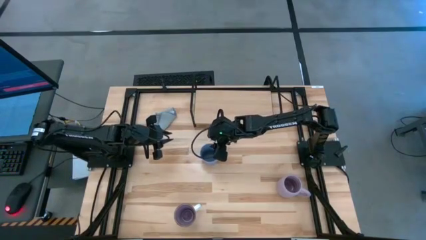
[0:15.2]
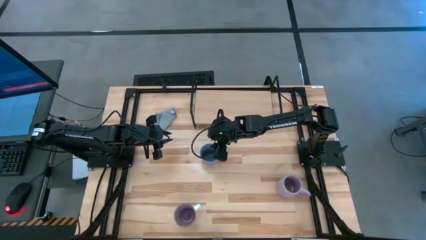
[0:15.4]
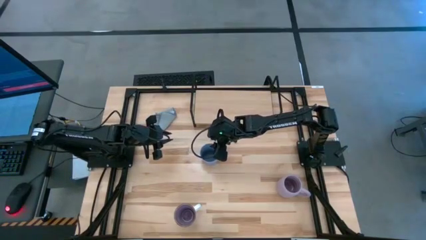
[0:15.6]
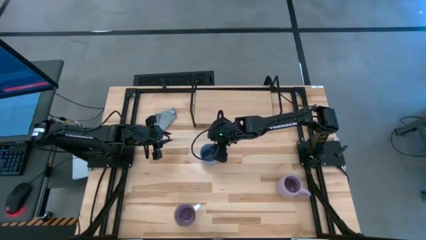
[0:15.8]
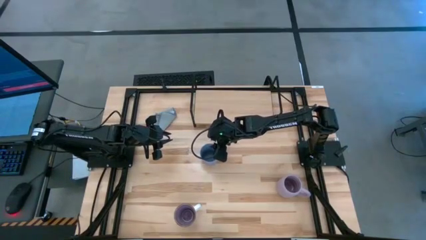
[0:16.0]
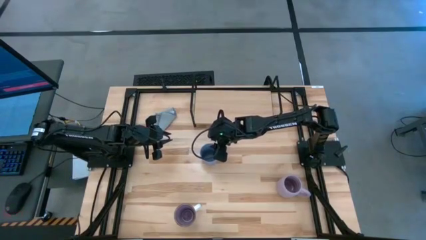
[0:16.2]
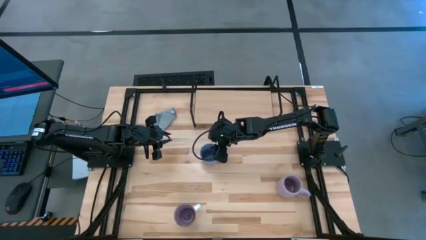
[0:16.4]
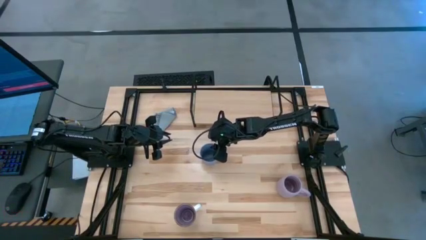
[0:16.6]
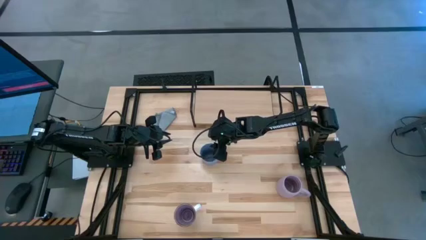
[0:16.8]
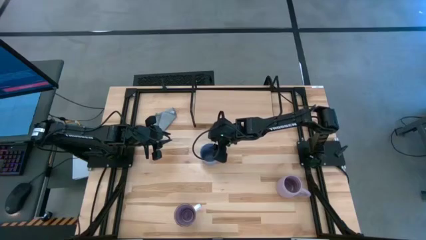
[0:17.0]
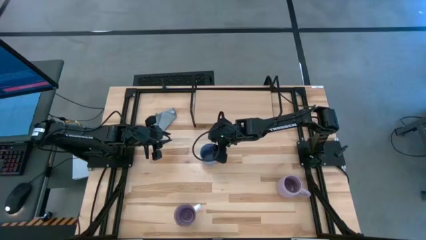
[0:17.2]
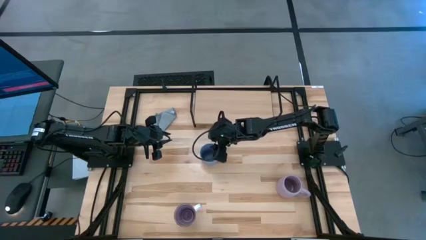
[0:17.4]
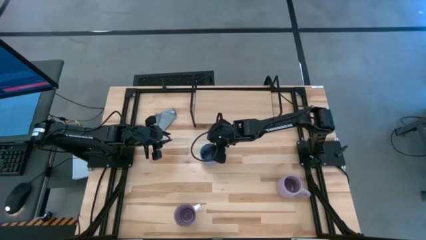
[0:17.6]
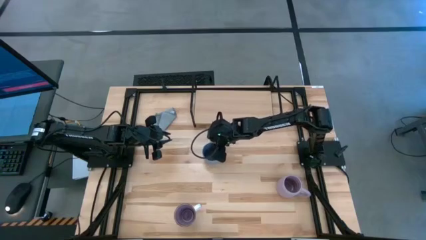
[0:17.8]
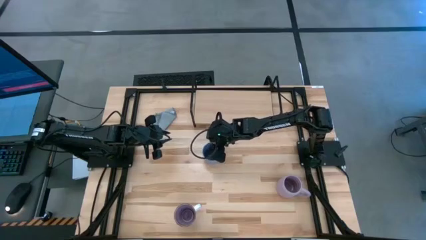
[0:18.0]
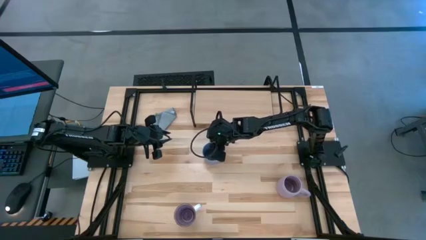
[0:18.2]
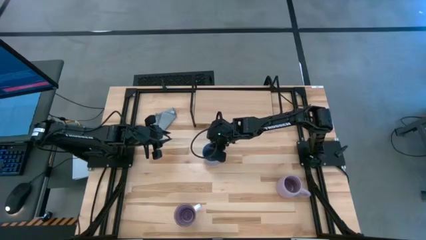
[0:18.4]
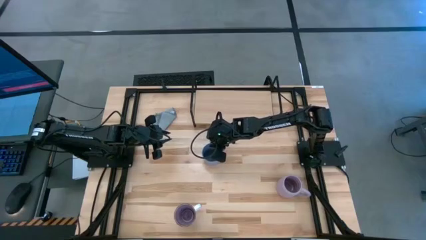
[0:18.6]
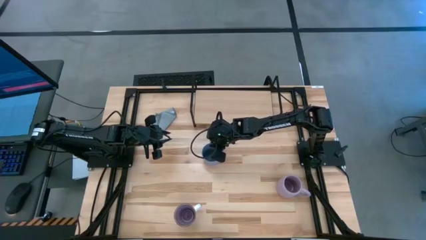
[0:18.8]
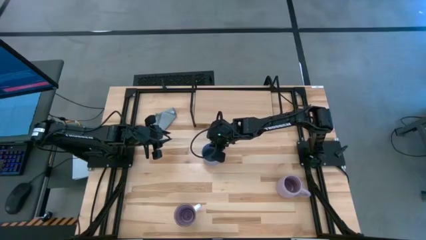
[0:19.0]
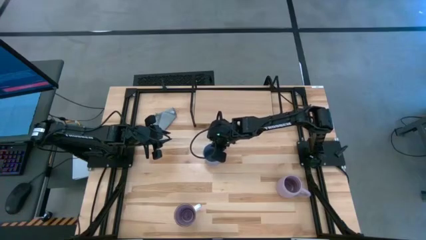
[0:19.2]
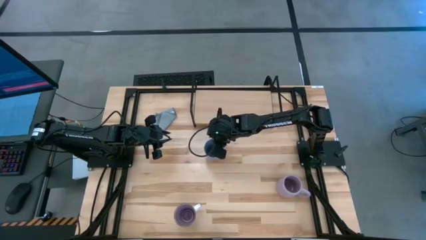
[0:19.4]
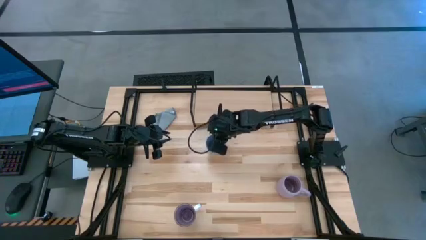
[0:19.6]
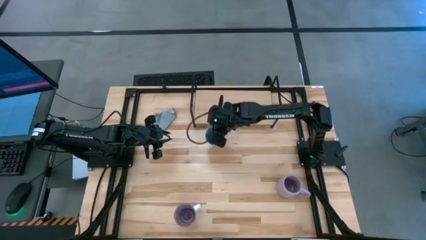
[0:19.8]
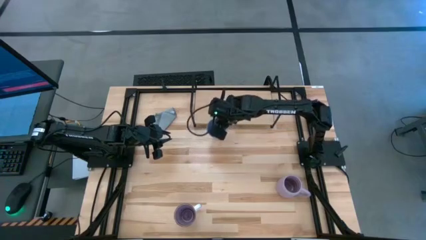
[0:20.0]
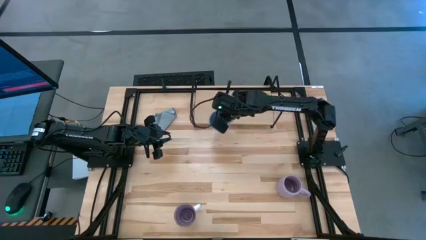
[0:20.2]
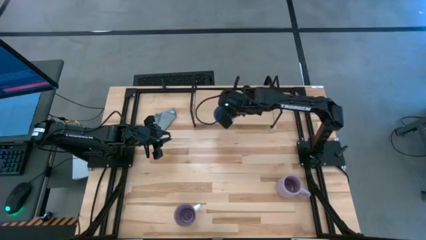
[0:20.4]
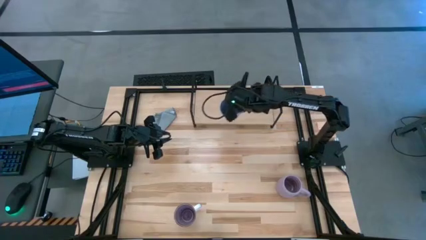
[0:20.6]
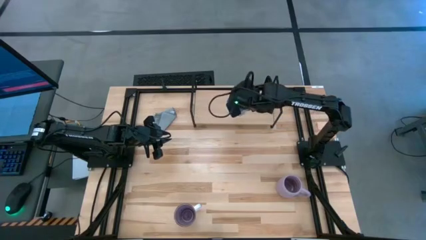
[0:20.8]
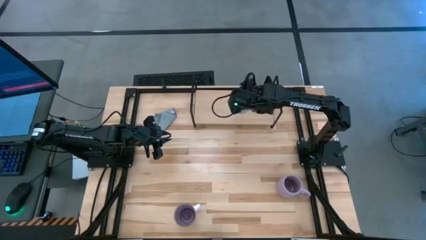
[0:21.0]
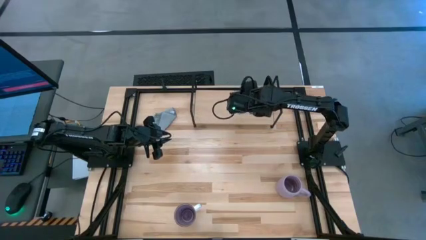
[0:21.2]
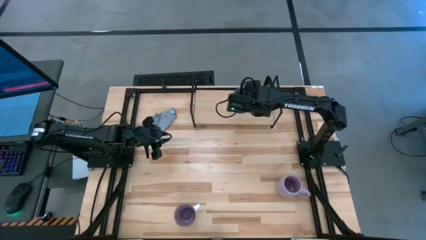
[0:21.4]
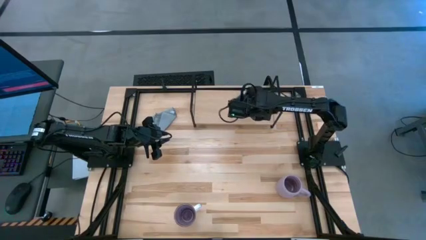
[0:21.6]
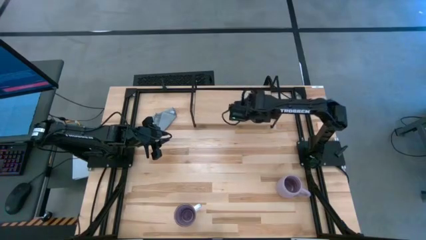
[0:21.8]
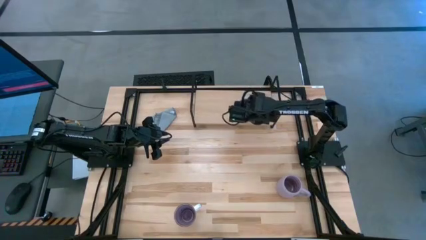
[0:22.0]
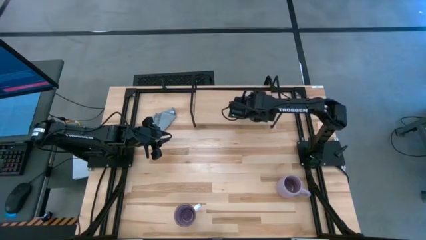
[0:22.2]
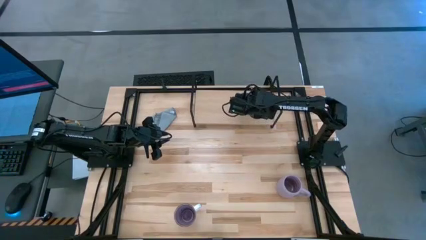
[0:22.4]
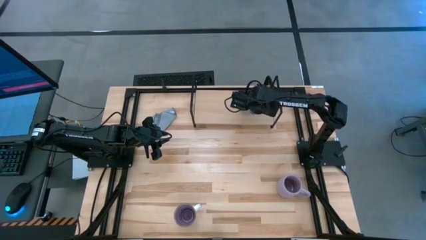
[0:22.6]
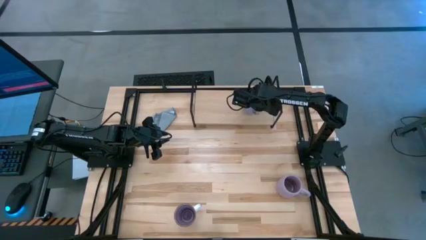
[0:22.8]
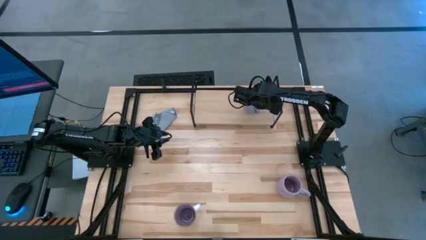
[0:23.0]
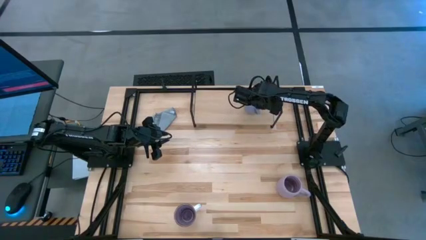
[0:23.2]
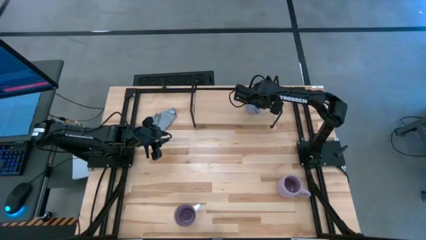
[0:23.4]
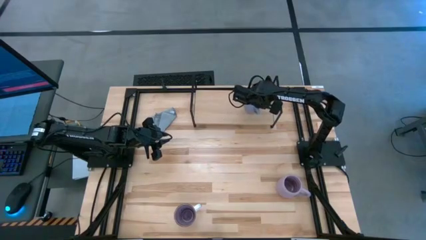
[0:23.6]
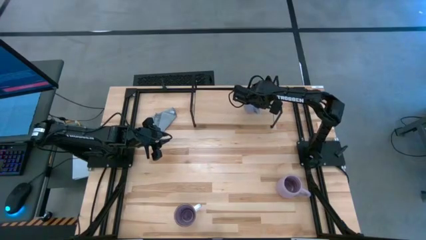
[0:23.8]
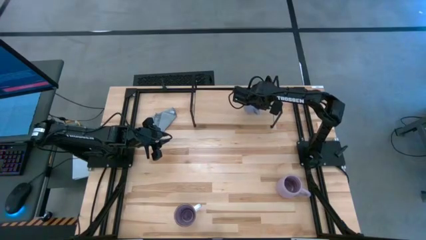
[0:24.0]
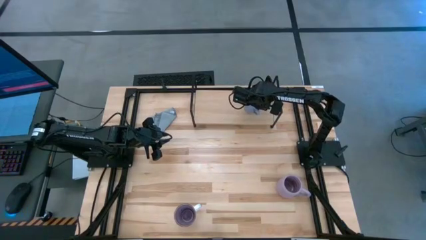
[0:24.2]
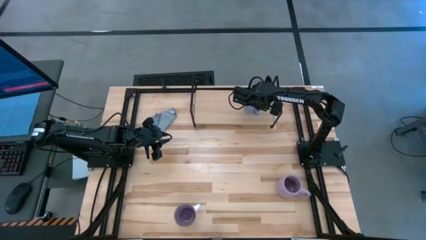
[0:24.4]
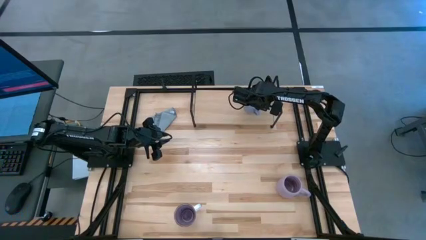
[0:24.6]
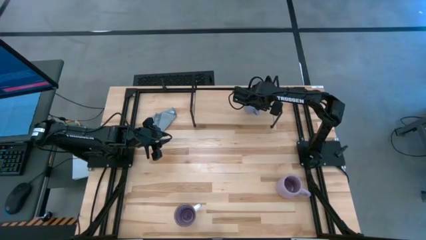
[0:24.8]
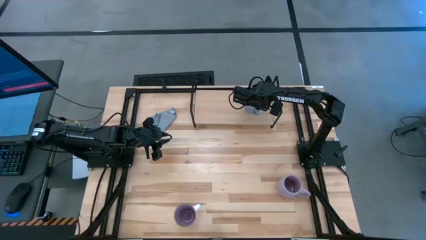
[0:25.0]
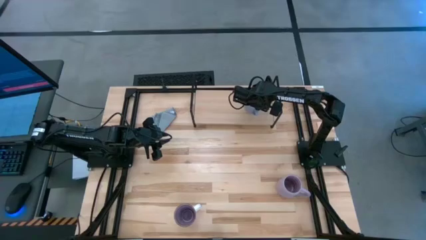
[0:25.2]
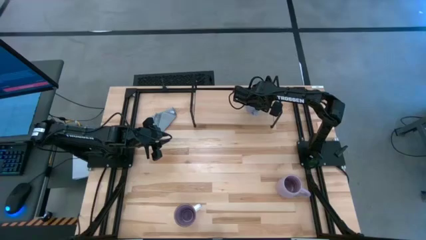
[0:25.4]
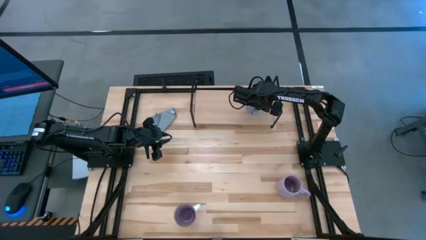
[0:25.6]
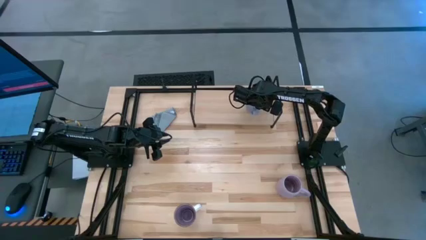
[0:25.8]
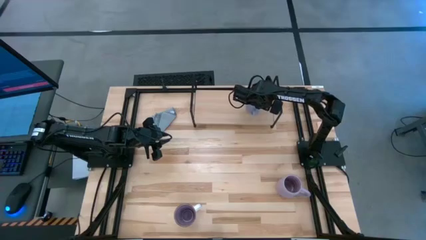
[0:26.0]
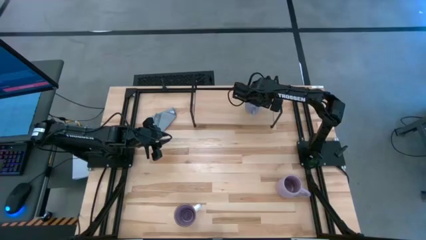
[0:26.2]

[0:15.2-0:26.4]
Task: Stack small to large cups/mugs on shelf
Put the blue cup on the shelf

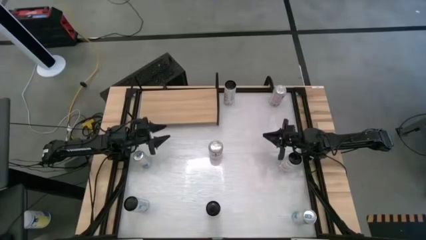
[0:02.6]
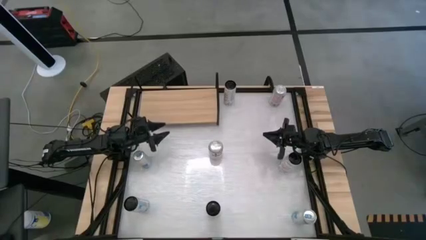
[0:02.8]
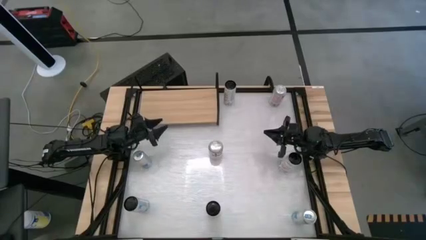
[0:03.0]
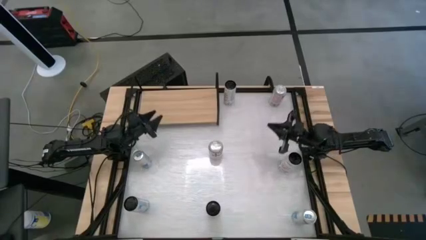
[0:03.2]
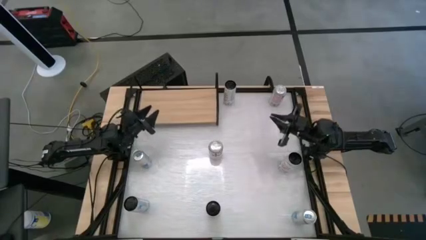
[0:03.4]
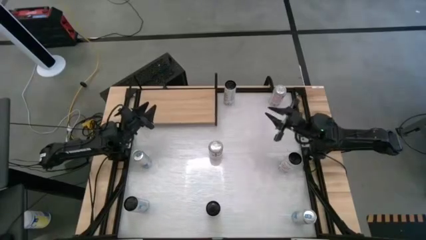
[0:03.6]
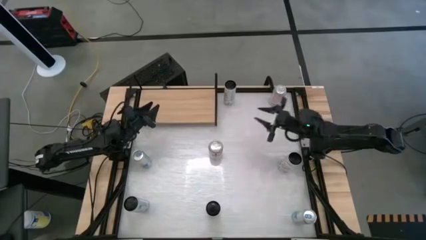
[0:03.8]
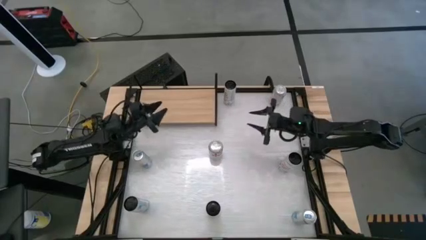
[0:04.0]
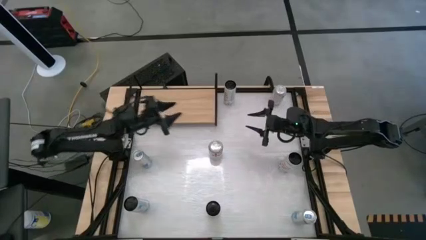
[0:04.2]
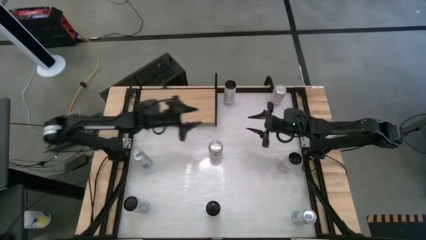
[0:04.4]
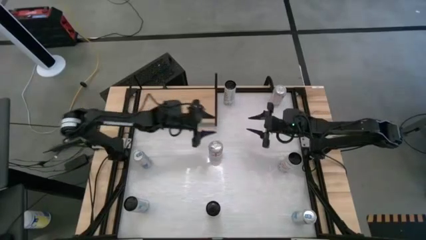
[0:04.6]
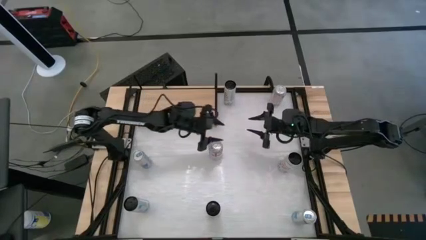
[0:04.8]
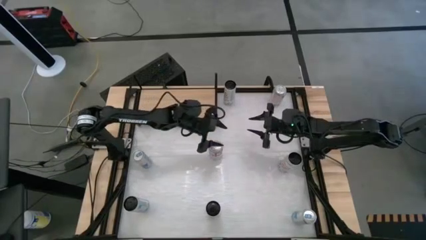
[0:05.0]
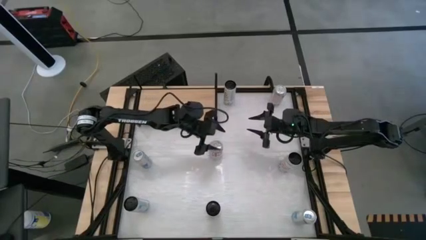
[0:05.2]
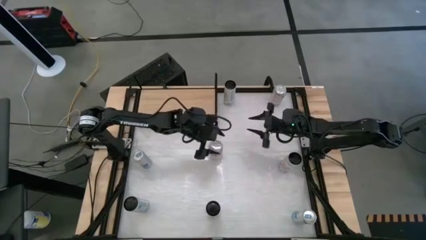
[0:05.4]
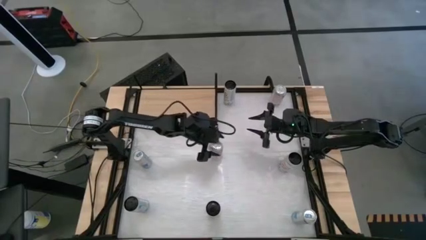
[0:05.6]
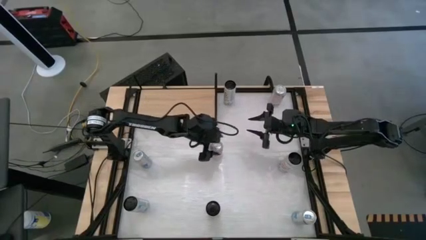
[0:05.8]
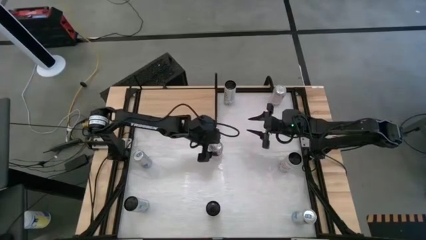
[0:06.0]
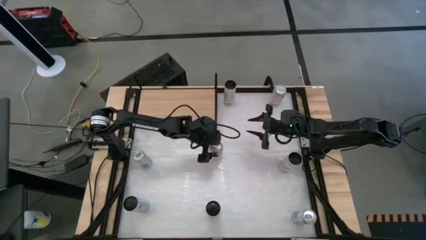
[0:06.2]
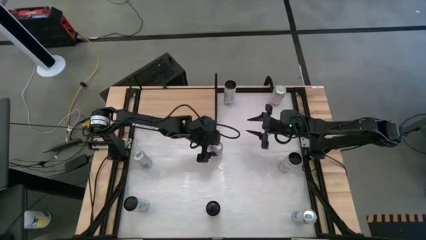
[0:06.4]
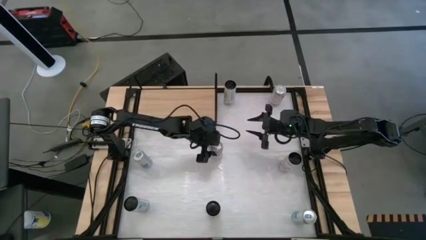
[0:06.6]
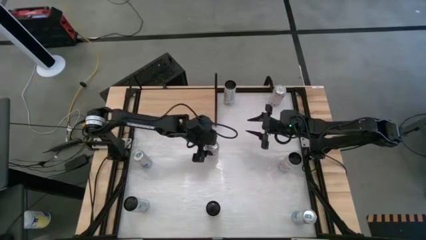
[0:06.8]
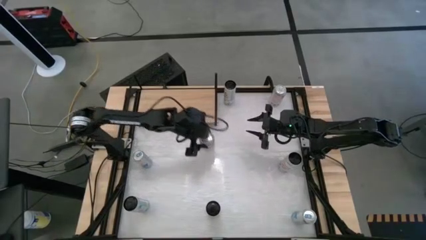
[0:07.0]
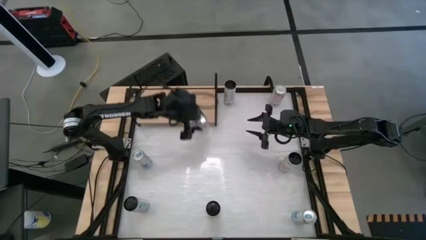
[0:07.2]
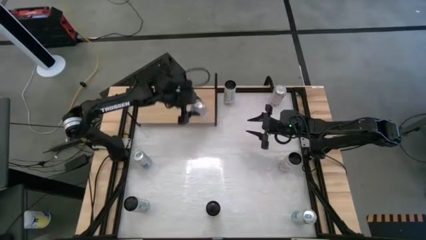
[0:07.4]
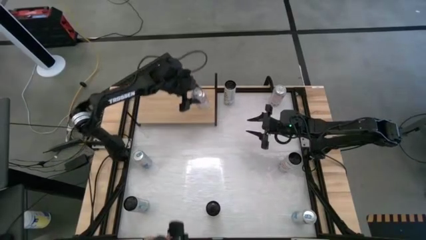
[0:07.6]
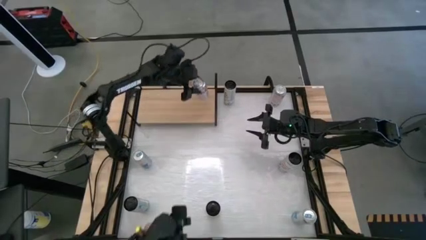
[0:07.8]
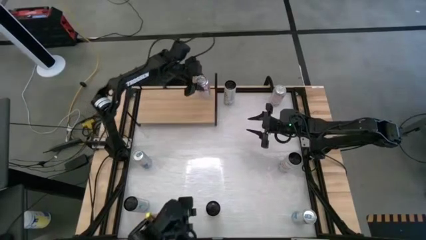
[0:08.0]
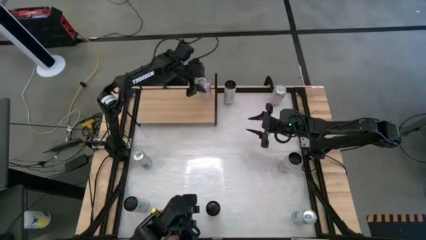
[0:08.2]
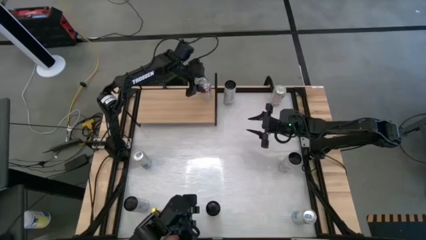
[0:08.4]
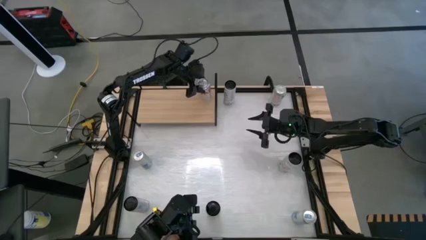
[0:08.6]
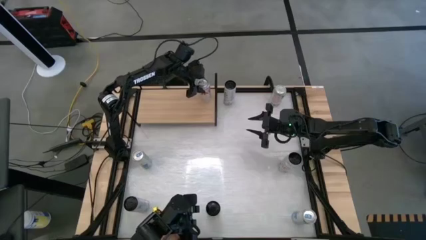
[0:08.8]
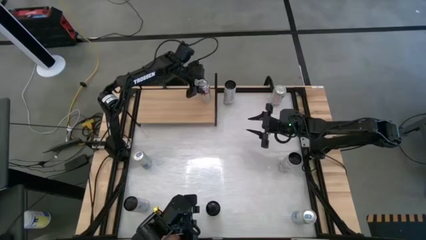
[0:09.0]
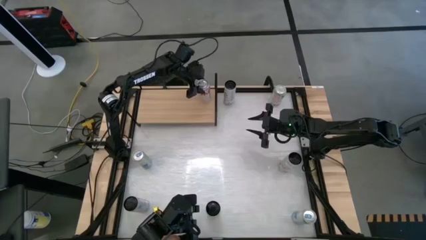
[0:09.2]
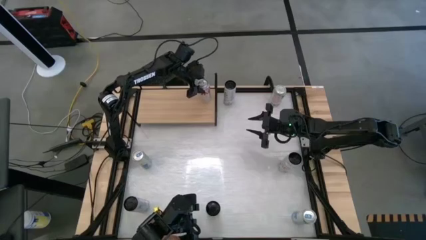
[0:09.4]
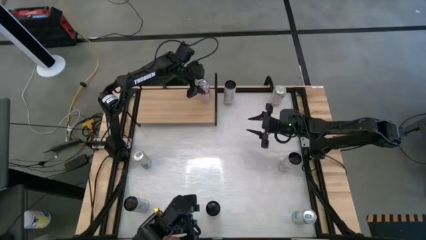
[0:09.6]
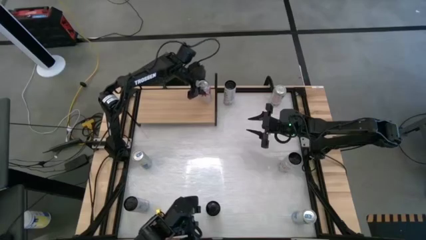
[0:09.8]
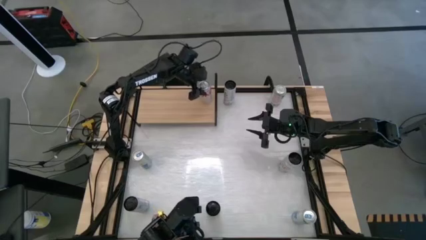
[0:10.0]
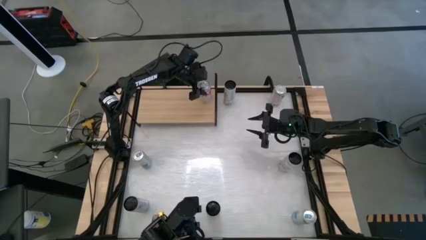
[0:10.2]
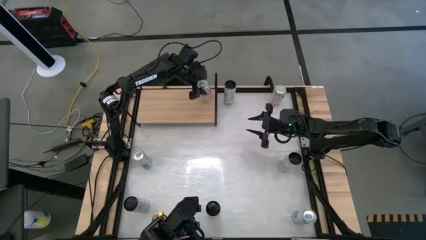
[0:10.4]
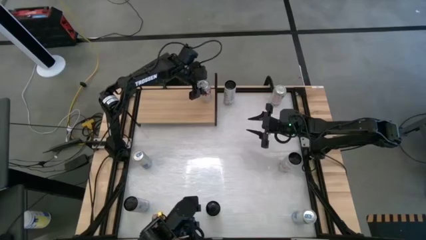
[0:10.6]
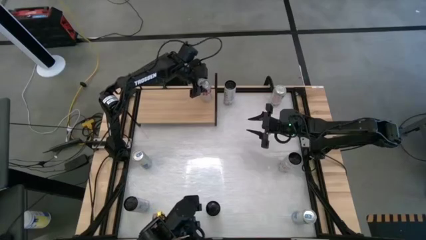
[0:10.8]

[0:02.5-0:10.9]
Task: Place canned beverage on shelf
Put the bottom silver soda can on the shelf
